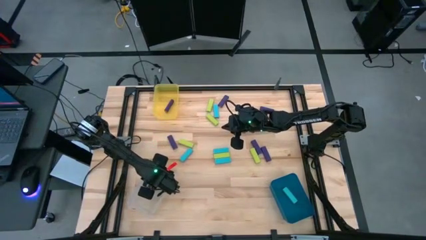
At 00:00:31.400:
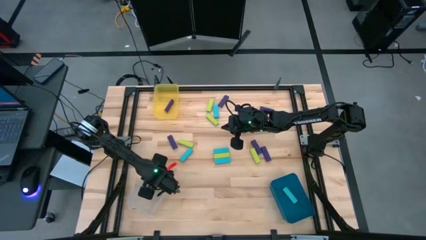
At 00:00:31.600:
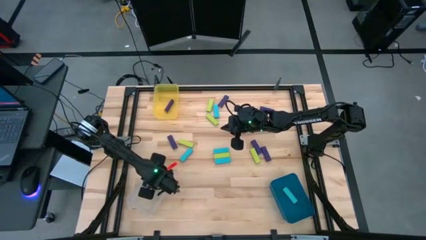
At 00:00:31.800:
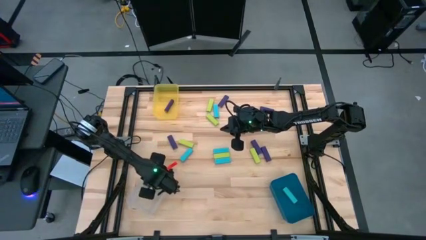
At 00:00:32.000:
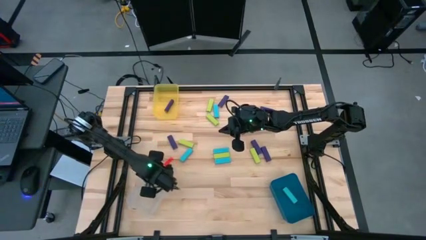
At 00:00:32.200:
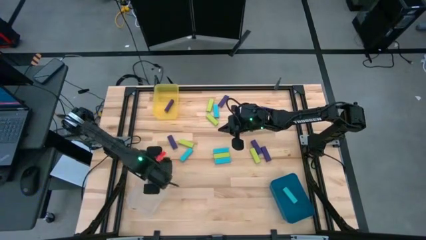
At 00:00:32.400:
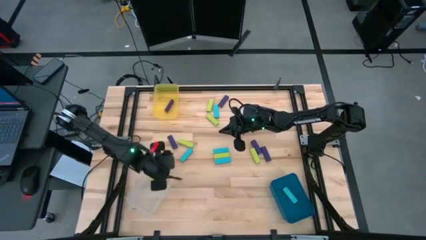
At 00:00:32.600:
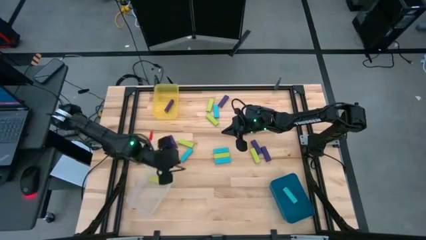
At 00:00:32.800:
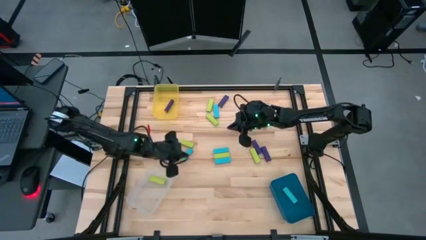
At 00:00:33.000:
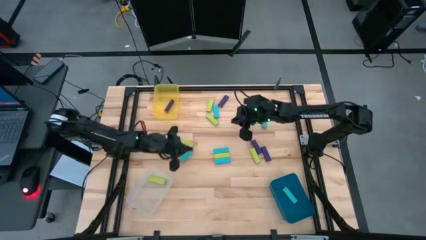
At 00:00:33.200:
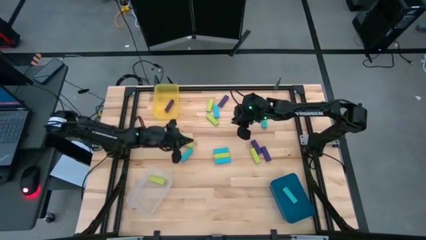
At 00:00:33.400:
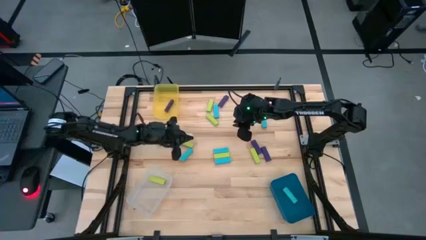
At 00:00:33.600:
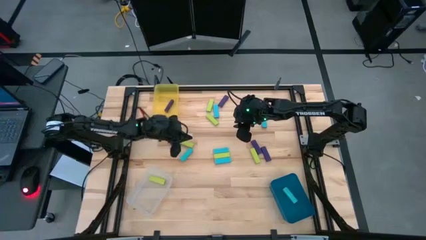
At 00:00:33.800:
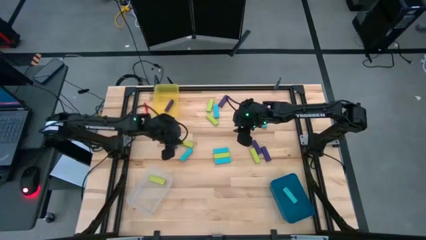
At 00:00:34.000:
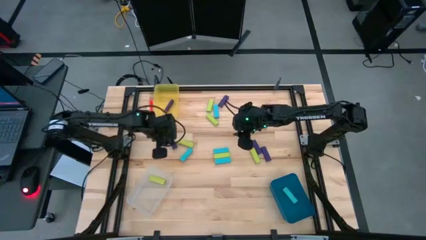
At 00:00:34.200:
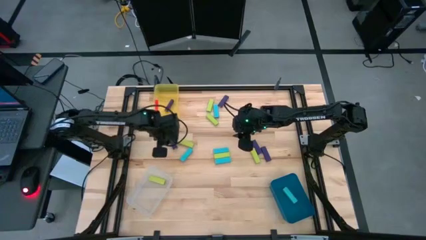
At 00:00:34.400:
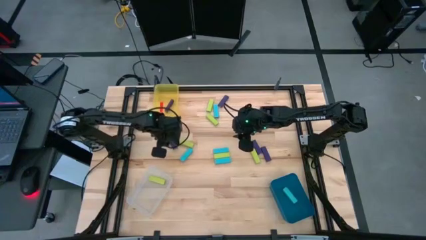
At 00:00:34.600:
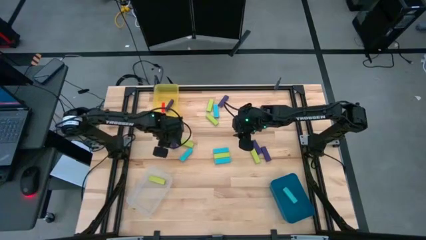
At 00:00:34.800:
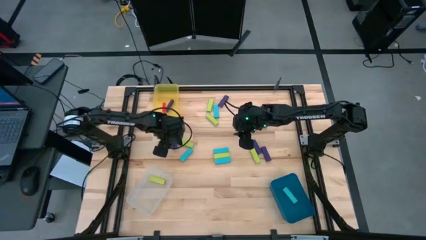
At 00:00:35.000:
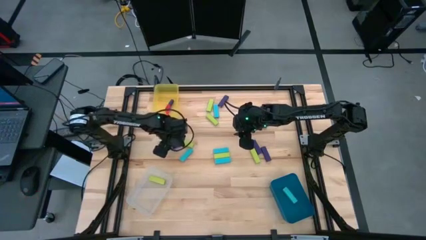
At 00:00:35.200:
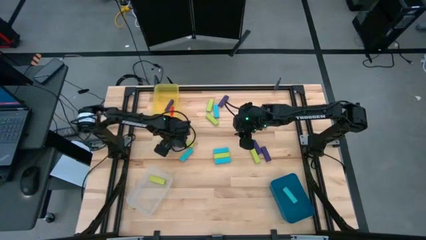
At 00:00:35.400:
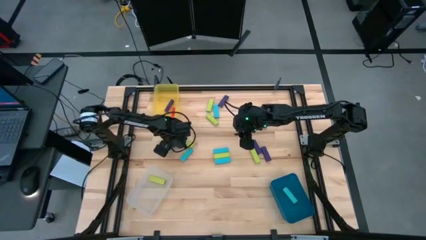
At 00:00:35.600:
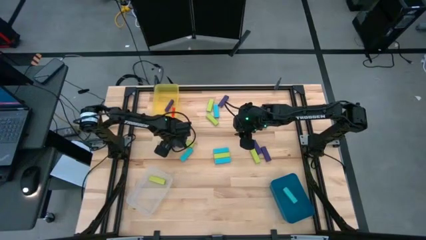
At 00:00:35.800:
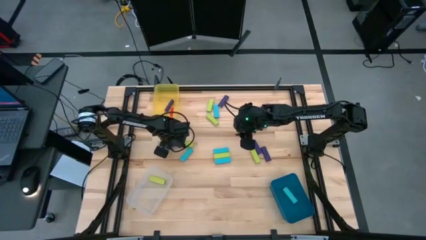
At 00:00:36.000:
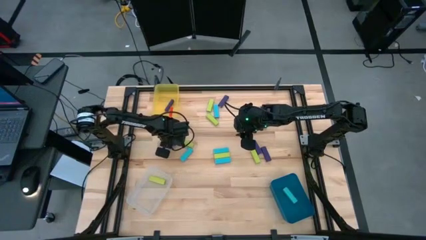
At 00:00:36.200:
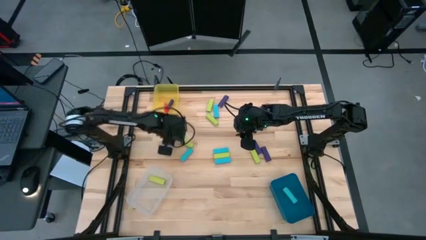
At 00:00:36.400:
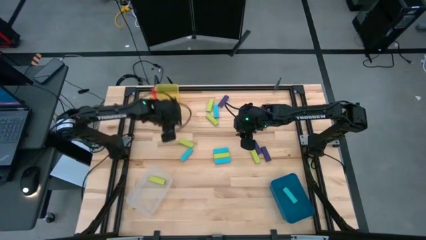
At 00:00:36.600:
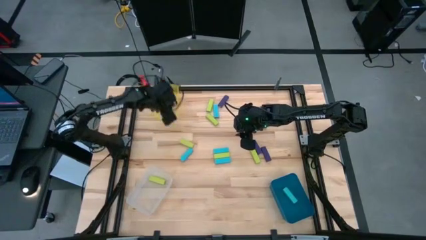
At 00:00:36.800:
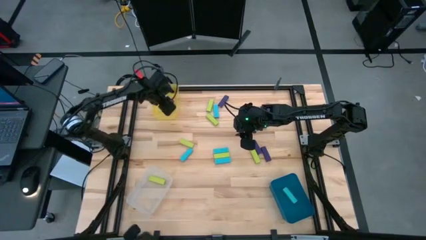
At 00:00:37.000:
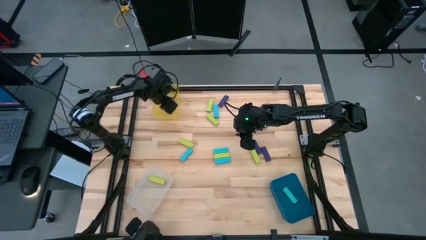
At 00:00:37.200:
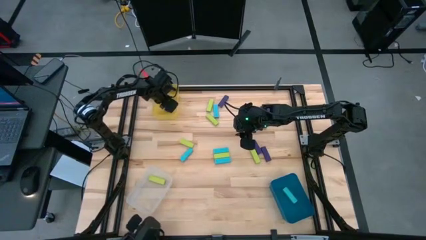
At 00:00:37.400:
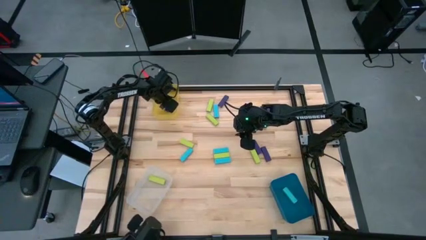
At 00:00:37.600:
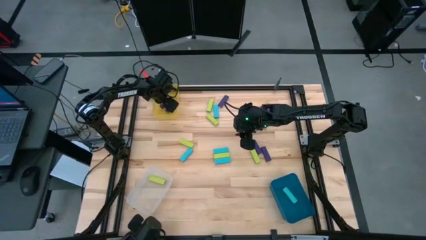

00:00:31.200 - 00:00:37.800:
Task: Sort blocks
Put the violet block into the yellow bin

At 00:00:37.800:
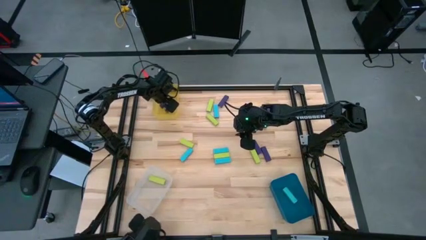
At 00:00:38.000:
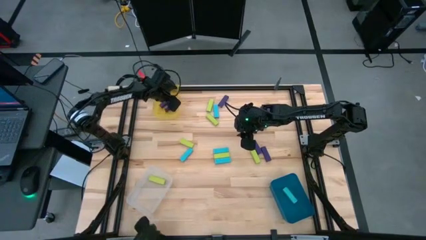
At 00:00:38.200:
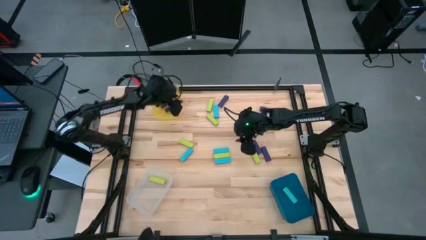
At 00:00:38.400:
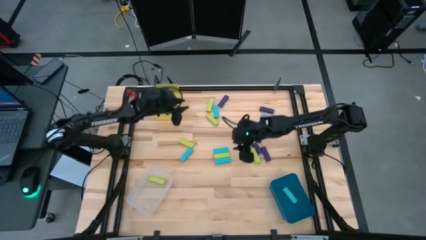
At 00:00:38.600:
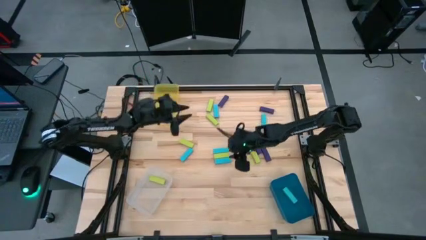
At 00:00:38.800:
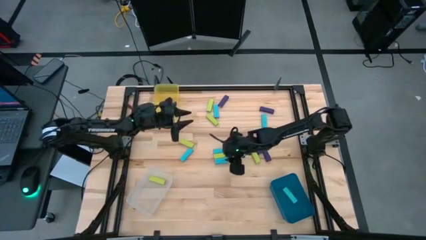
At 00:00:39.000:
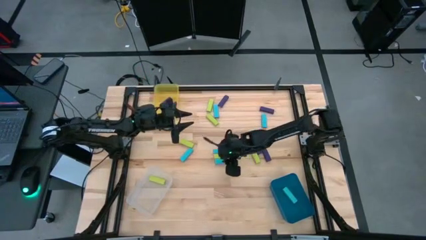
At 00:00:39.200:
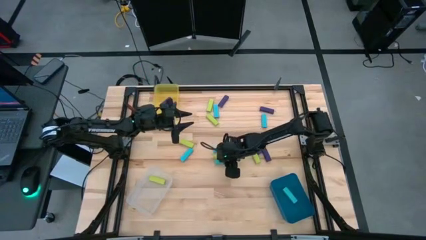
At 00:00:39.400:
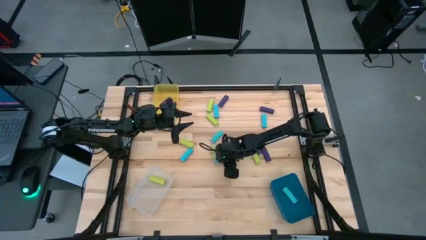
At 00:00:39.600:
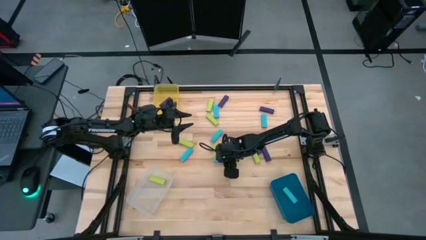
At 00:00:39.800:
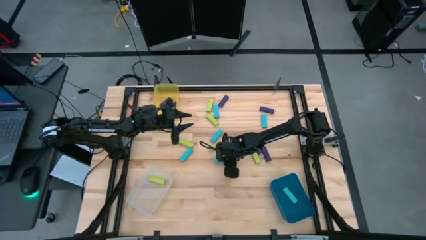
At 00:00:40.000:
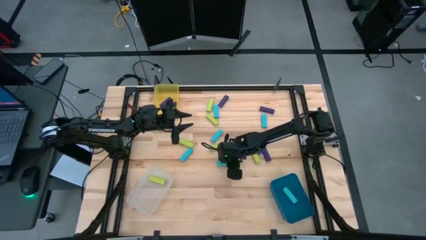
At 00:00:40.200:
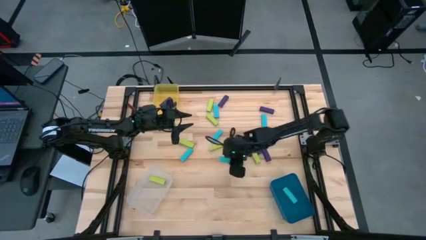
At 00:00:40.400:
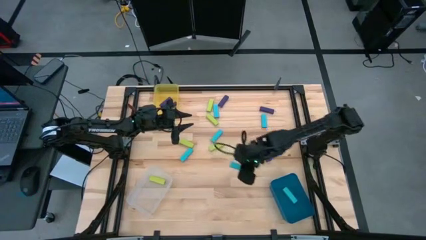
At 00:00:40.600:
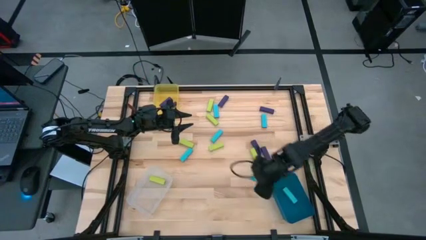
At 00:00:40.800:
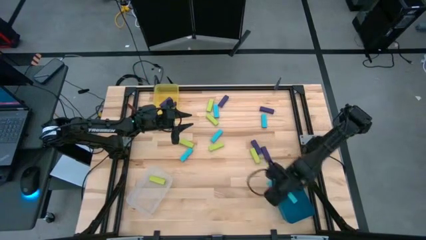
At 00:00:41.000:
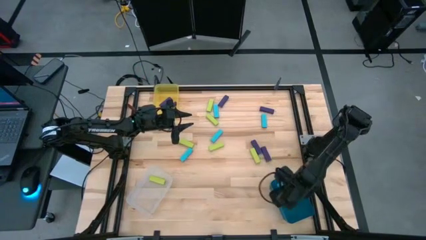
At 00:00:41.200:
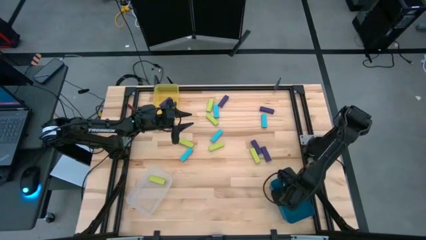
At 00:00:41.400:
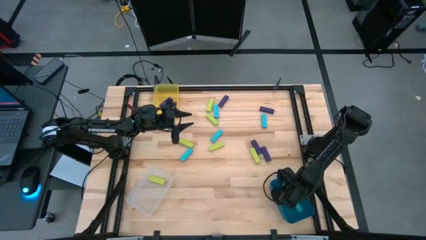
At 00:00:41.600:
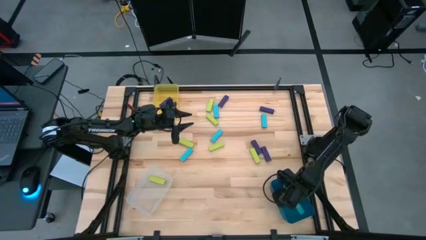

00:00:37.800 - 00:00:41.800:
Put the blue block into the blue bin

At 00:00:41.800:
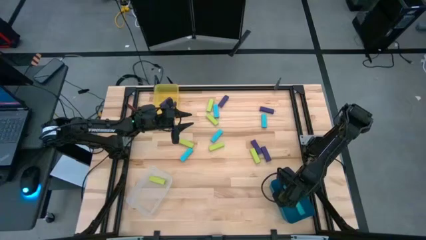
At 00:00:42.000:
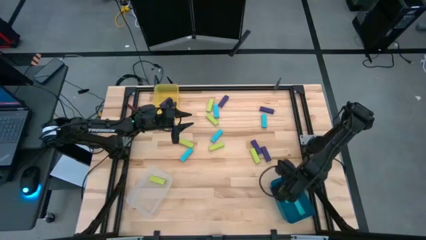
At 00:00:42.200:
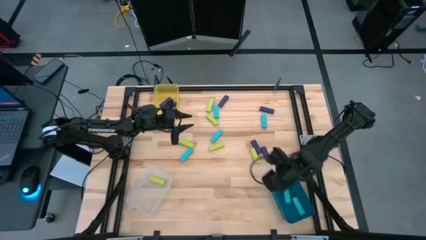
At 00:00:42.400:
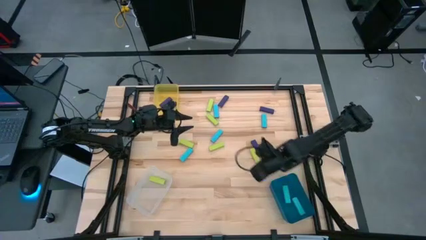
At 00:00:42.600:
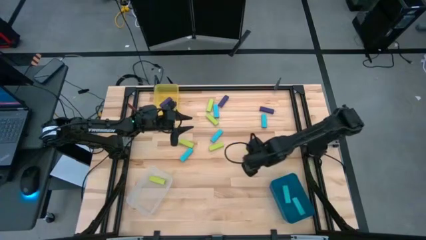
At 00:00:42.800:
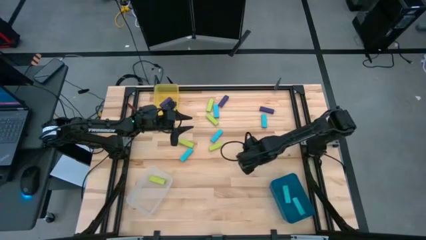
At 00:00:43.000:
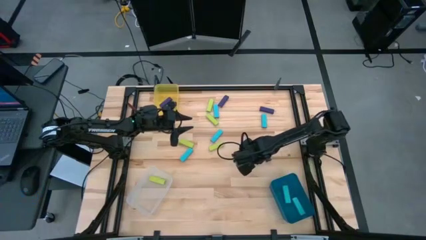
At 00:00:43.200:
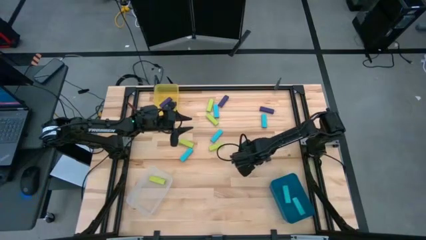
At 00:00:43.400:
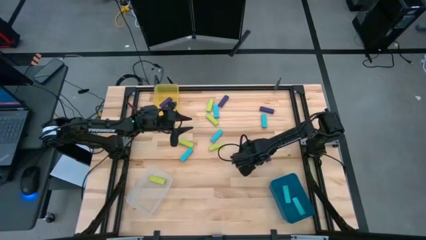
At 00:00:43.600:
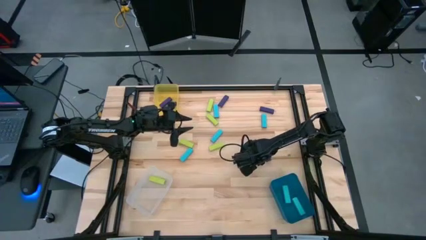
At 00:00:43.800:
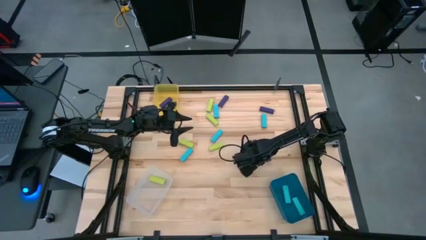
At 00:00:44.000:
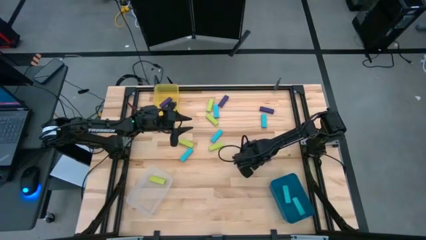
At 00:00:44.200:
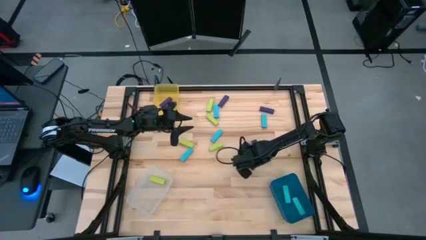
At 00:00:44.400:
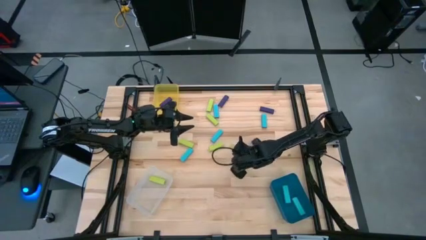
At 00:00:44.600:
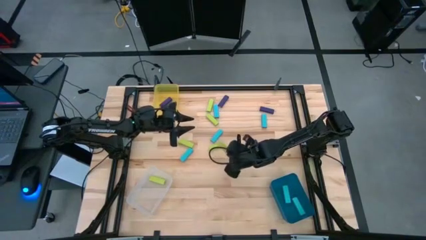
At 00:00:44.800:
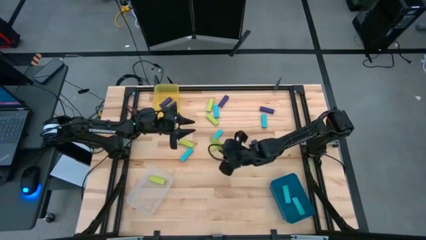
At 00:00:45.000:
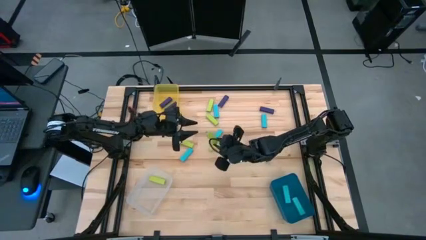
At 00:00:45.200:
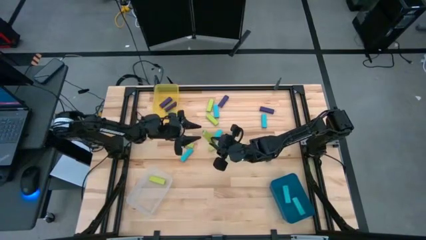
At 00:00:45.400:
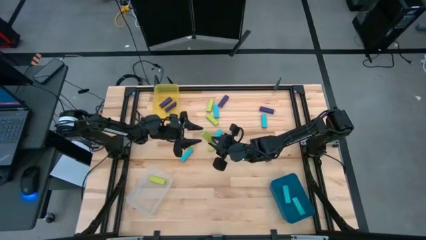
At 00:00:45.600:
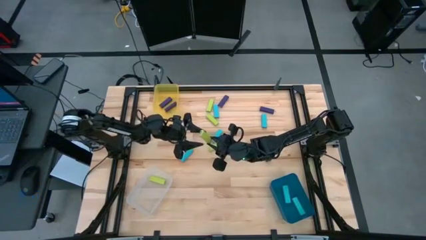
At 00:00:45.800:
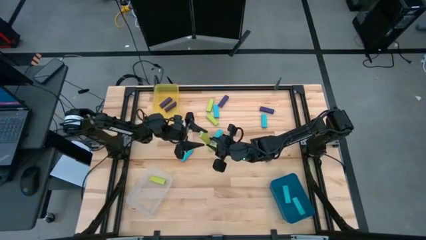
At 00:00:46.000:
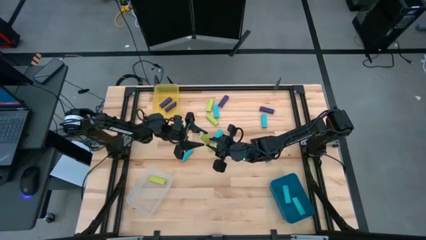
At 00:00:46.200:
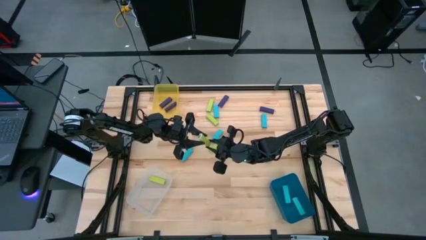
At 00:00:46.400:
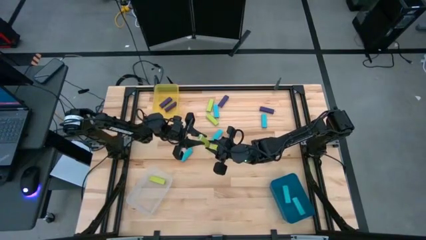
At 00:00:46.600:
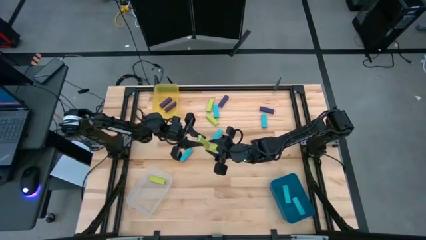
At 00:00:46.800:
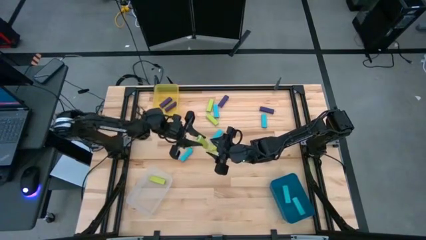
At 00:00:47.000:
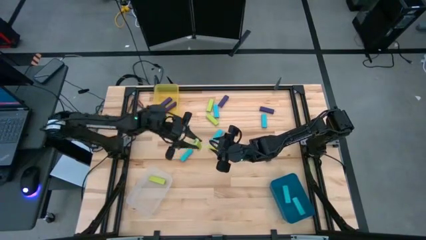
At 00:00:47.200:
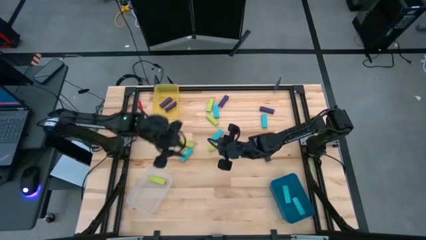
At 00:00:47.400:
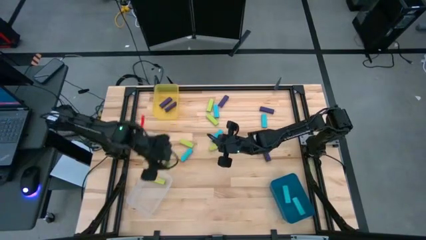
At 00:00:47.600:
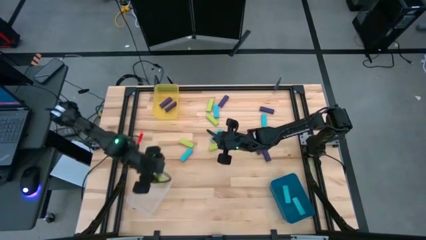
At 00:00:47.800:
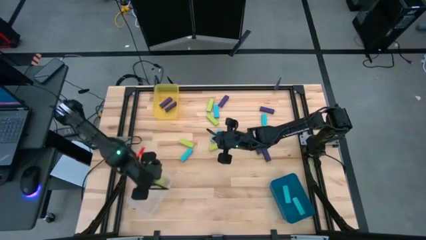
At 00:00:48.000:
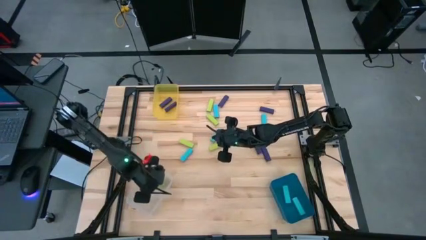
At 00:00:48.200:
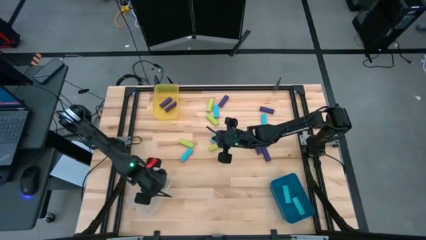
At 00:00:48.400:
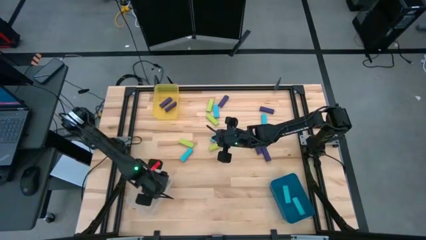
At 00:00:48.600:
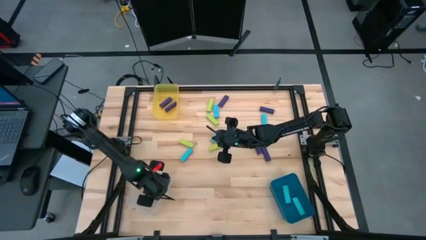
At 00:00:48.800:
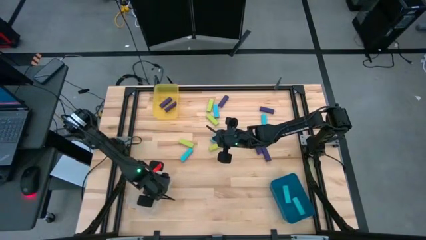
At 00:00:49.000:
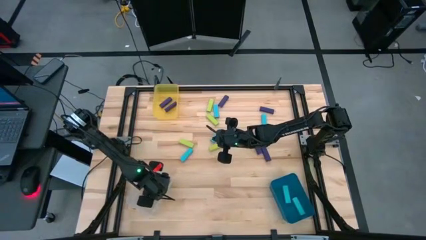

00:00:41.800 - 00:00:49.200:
Put the green block into the transparent bin
